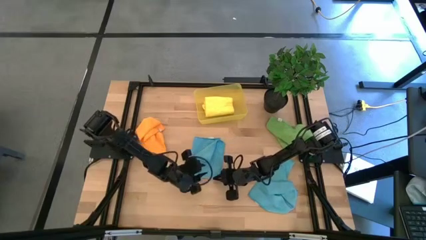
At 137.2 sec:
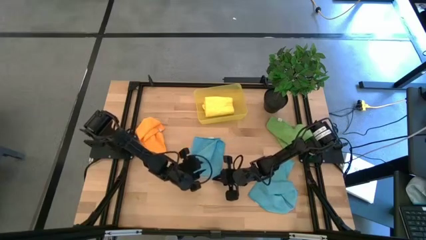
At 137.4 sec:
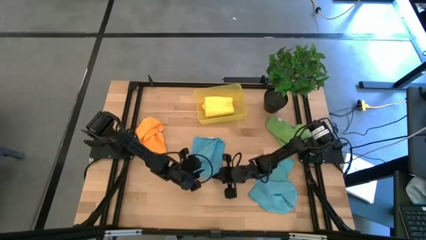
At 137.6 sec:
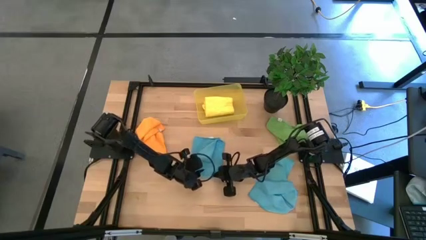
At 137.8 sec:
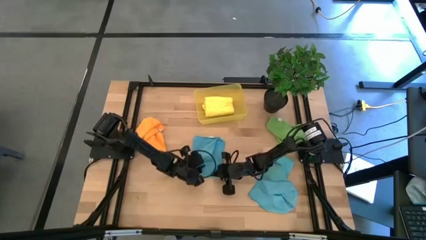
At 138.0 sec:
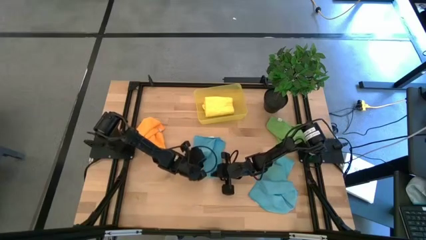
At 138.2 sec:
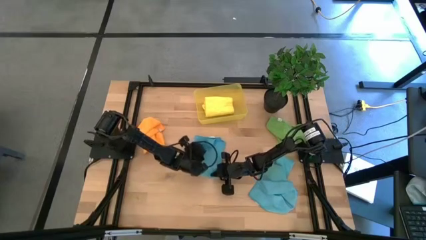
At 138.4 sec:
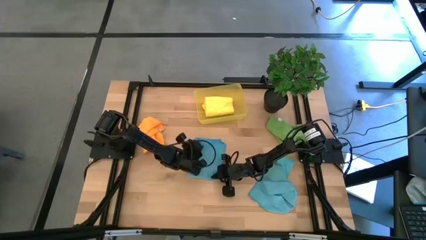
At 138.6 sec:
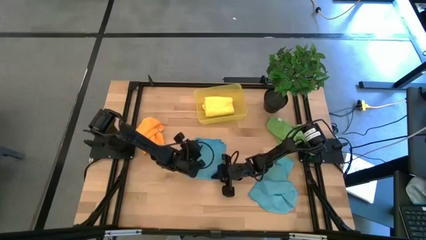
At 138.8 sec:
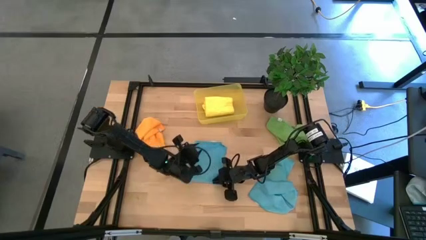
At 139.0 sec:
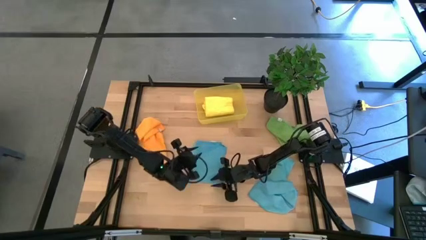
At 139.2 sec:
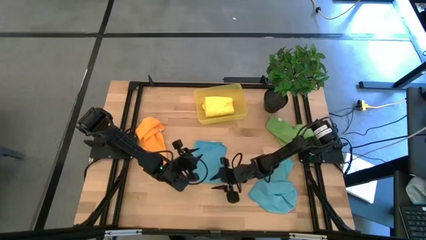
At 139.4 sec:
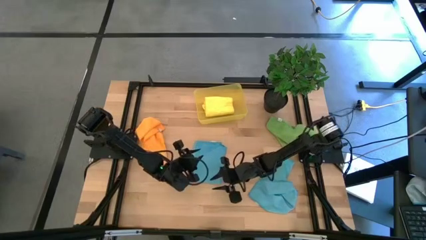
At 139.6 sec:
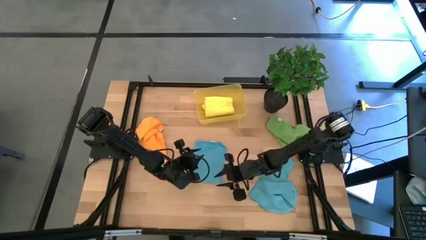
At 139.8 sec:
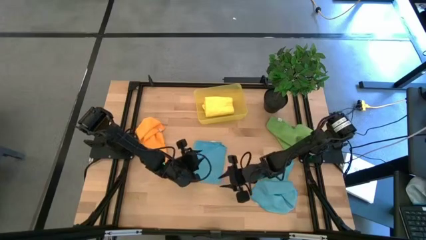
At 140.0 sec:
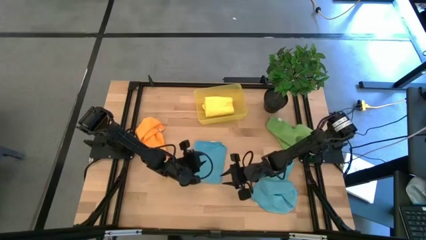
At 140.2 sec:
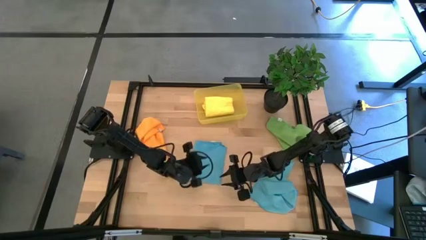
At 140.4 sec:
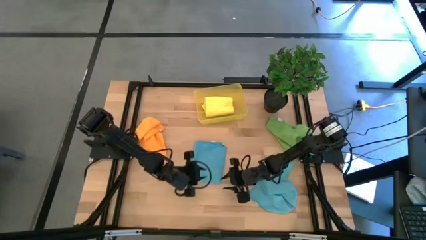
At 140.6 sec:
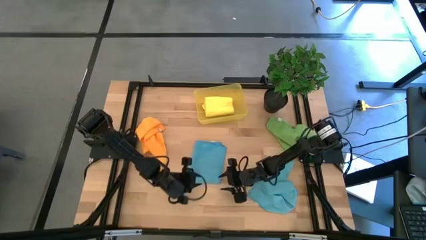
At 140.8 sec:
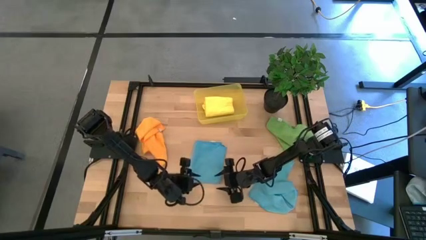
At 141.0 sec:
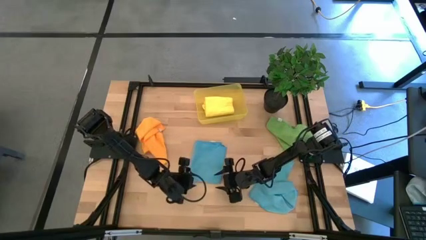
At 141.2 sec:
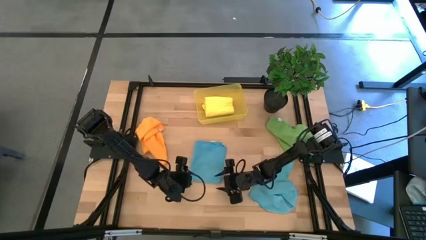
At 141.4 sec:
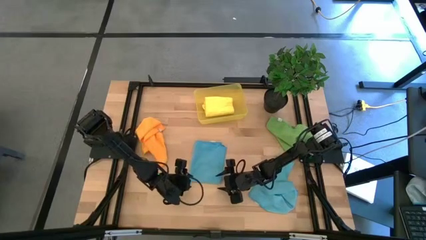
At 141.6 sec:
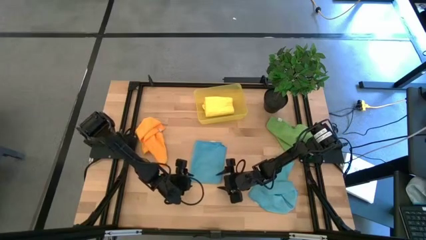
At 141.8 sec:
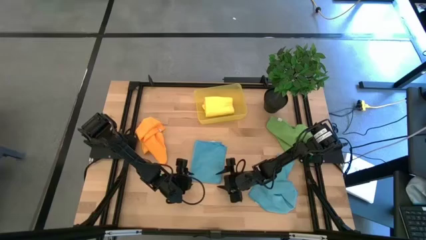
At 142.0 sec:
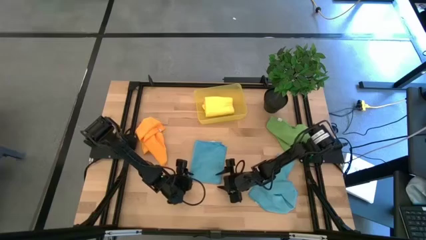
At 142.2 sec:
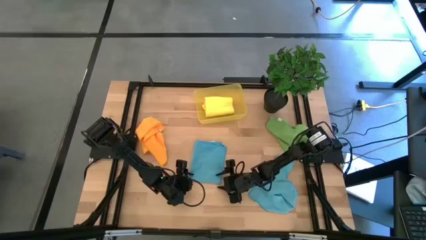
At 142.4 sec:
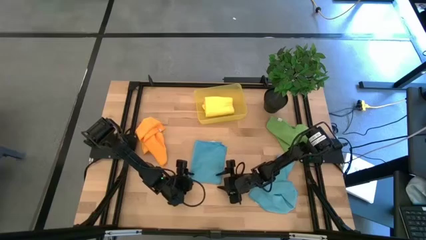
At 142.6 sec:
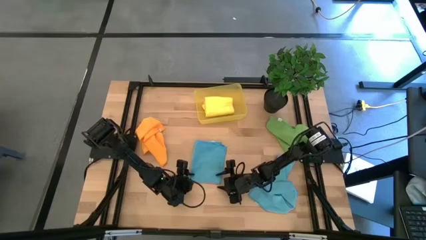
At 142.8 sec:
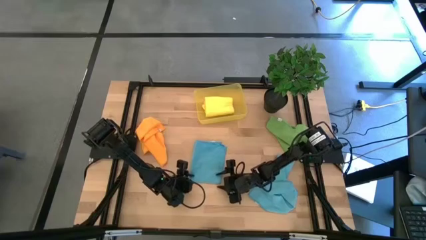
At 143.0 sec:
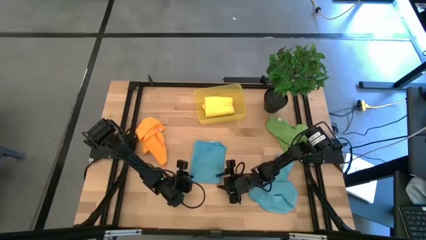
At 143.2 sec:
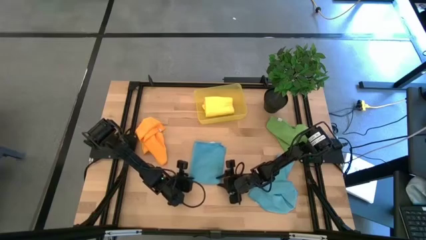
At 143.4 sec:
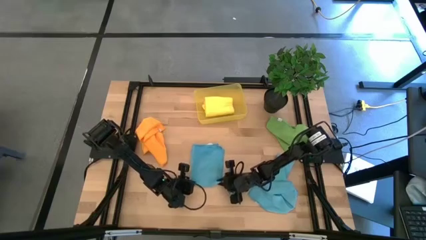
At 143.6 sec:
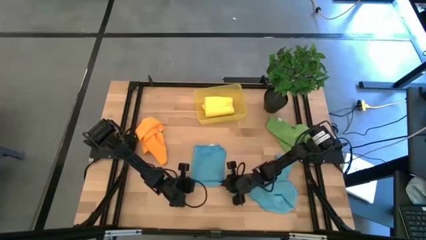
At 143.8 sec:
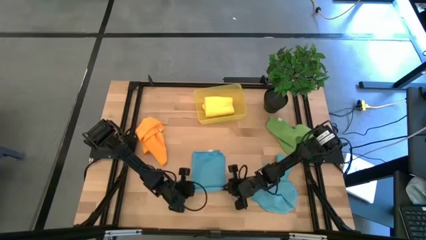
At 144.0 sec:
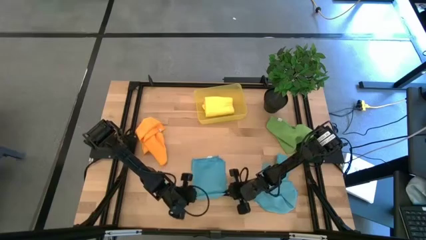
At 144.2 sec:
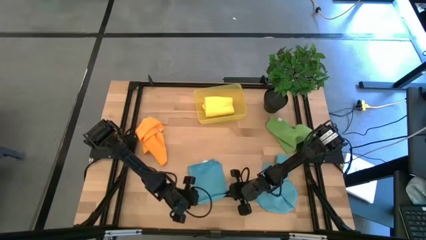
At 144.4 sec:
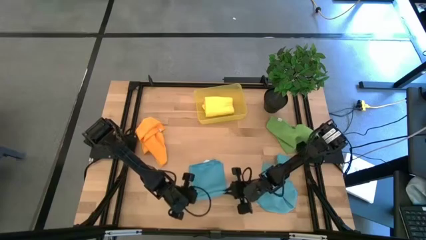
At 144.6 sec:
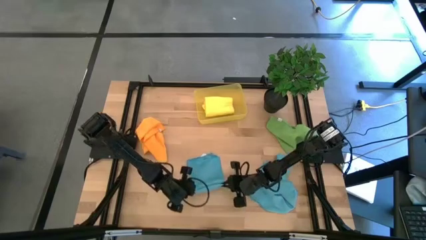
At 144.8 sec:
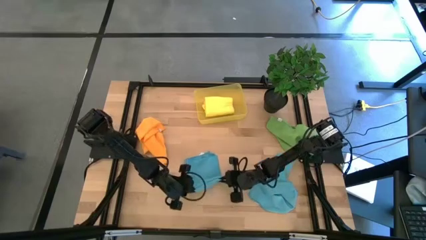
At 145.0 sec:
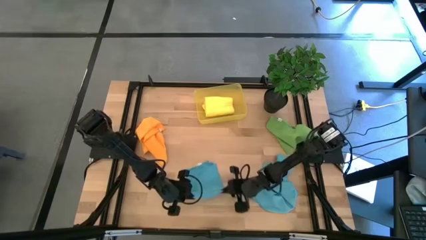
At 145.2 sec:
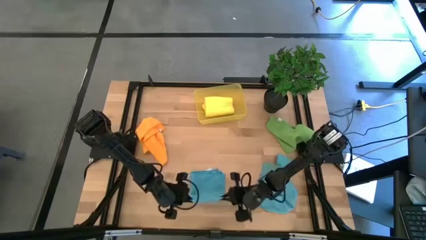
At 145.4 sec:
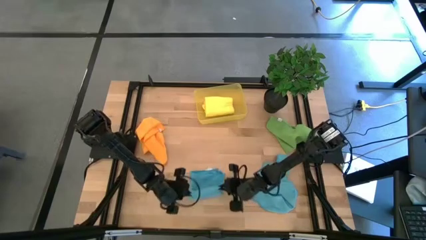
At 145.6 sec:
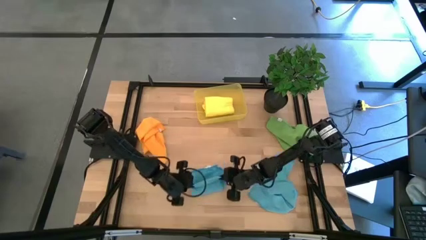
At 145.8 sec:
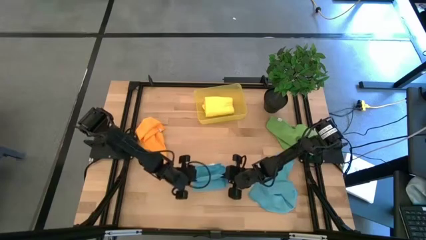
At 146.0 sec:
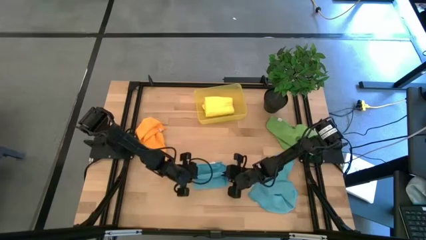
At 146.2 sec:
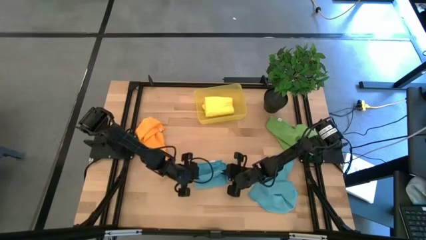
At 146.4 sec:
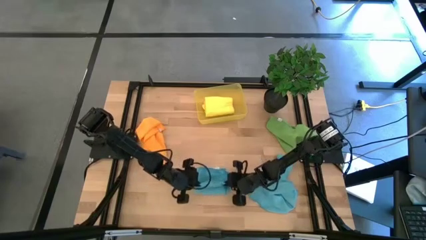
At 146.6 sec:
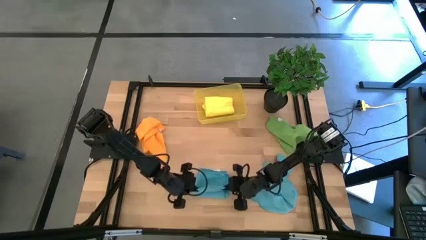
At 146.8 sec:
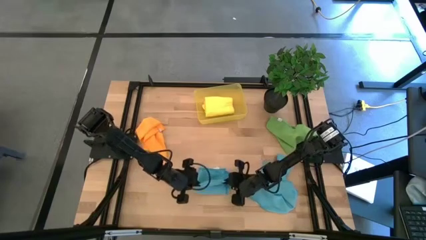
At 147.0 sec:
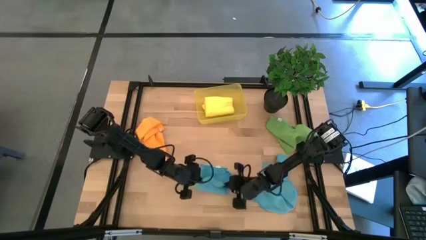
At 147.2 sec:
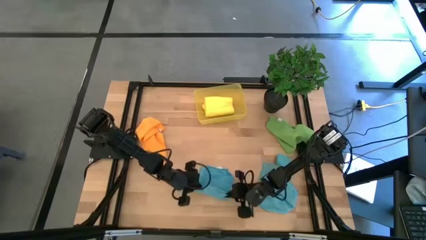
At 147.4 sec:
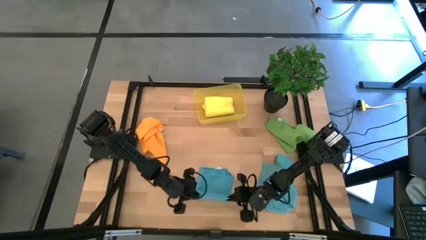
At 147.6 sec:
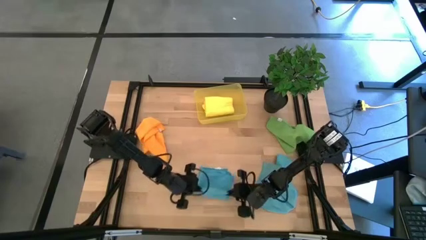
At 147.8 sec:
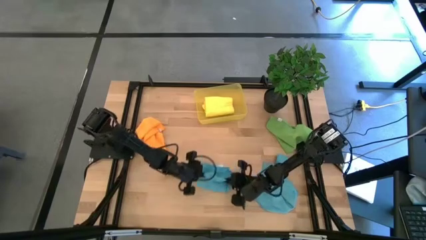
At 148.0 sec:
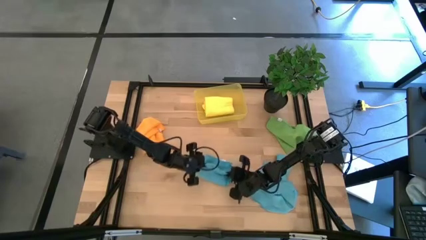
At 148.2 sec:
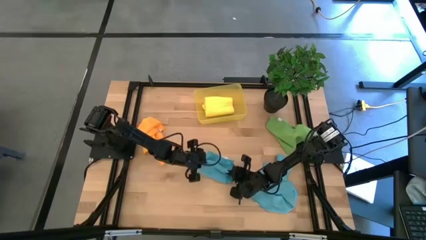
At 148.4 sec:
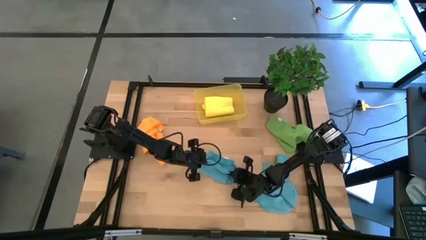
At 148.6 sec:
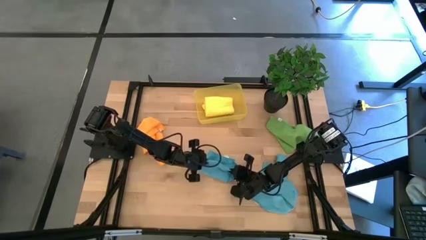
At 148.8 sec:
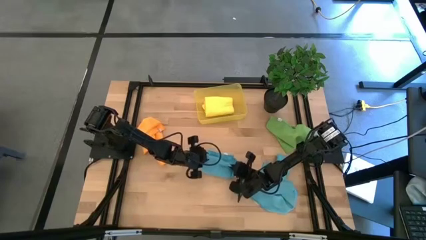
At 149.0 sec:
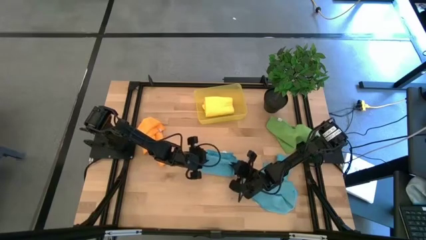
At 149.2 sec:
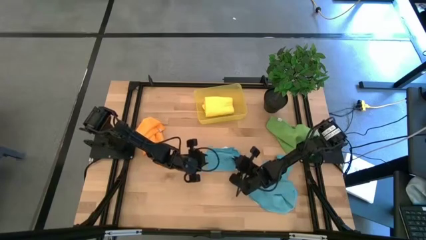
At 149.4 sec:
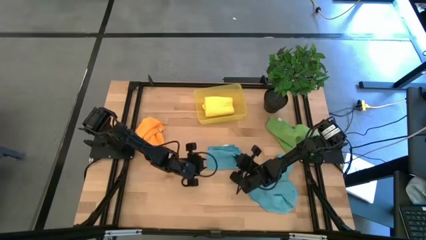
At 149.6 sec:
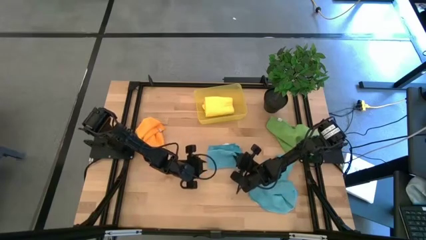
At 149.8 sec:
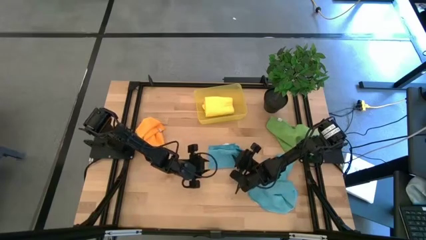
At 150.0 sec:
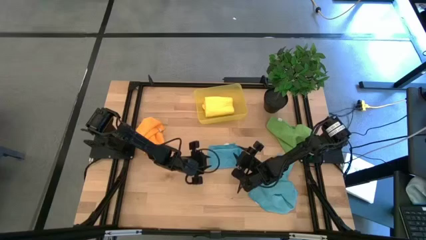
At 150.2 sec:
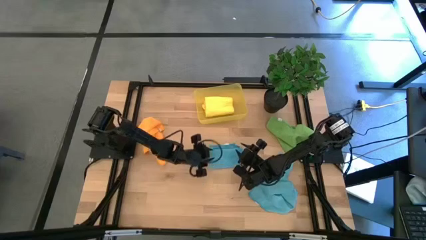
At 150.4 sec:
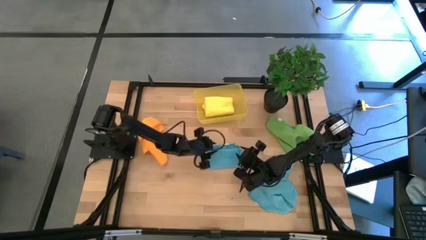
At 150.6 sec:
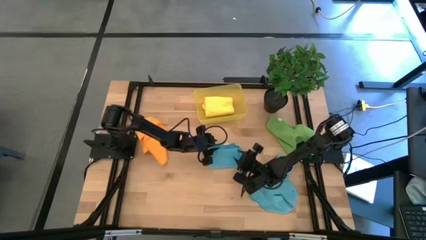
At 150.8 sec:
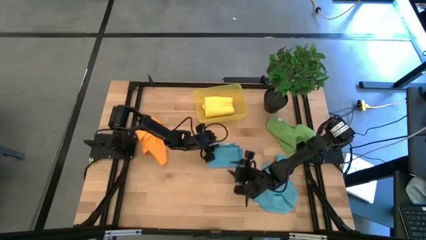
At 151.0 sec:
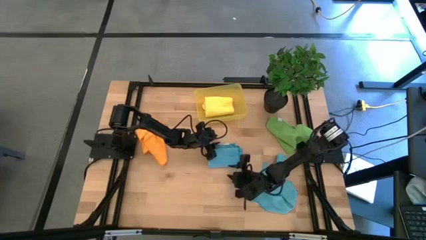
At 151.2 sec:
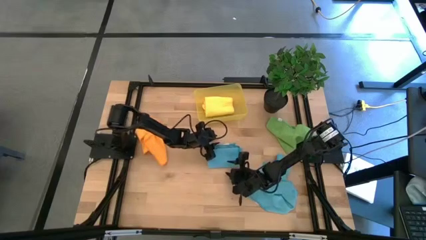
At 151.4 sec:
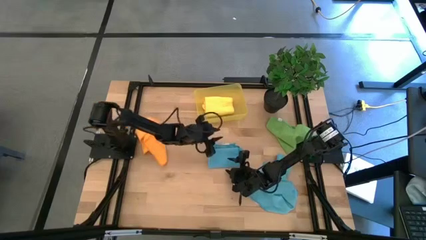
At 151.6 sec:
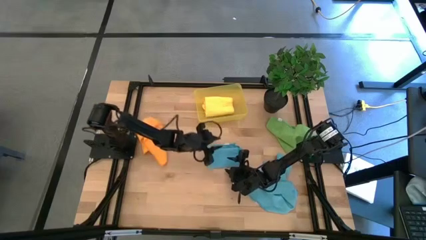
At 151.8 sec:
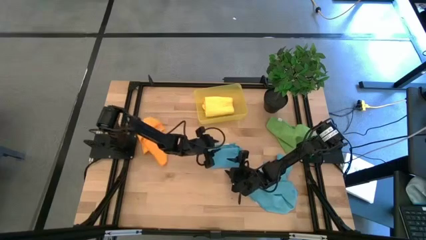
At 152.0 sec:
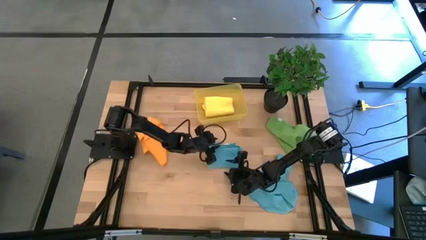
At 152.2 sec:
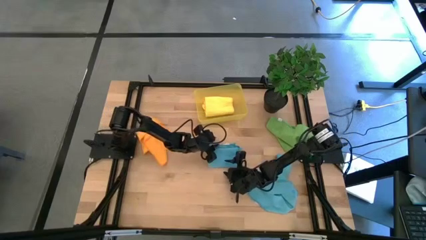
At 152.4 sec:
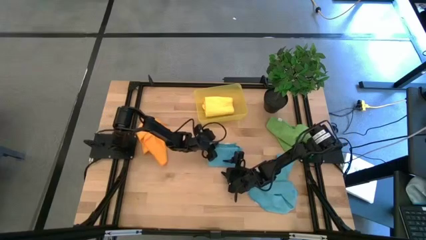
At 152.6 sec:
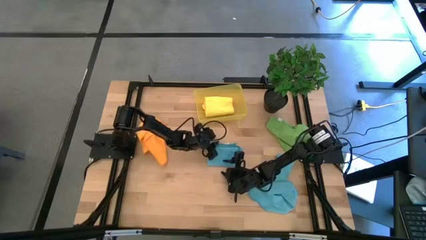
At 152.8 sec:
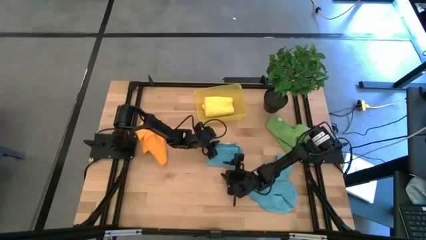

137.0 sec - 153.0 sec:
Task: Fold microfiber towels
Fold the left blue microfiber towel
